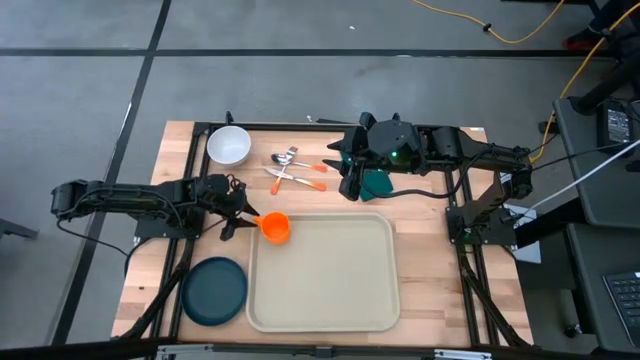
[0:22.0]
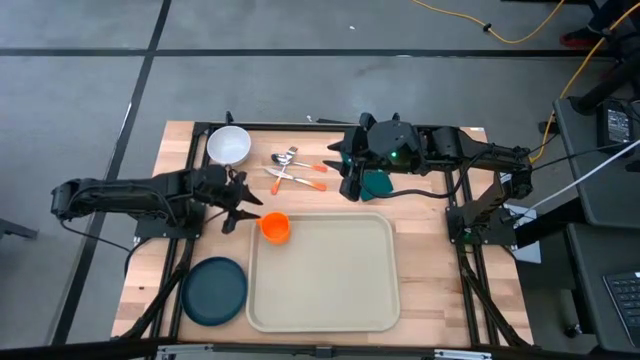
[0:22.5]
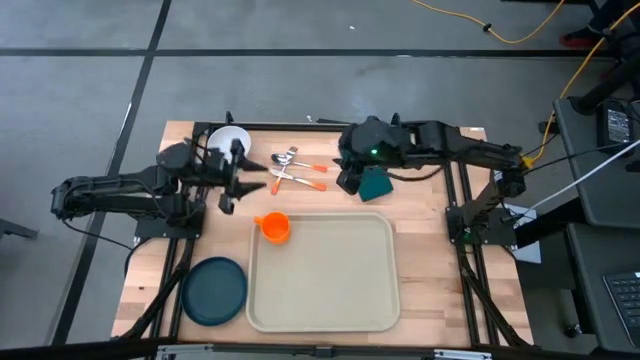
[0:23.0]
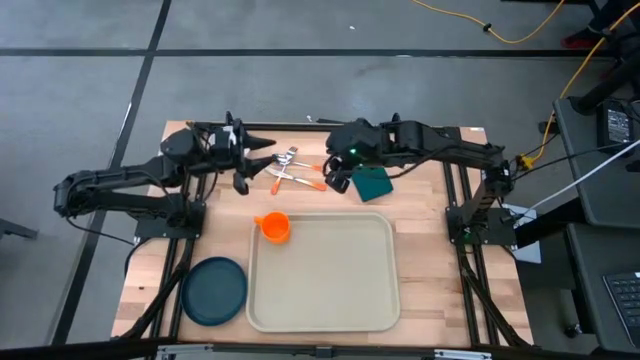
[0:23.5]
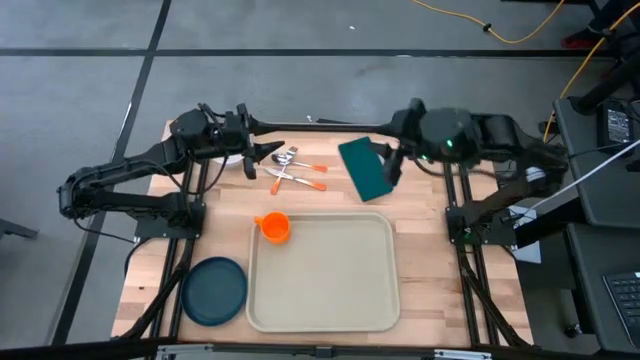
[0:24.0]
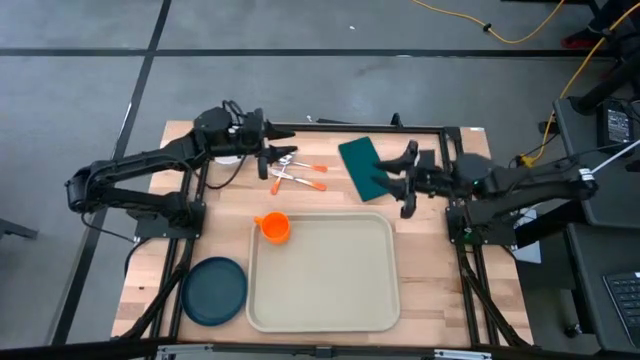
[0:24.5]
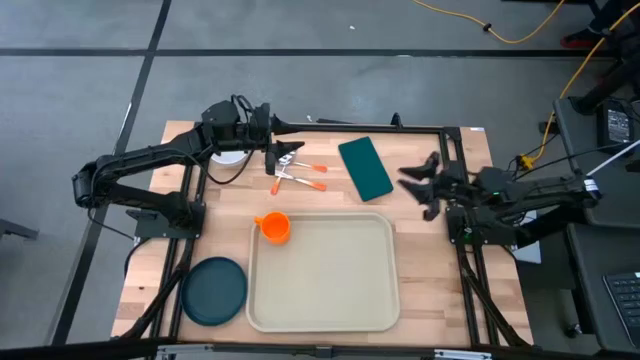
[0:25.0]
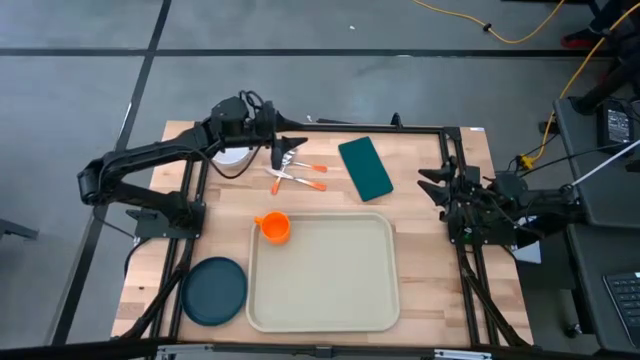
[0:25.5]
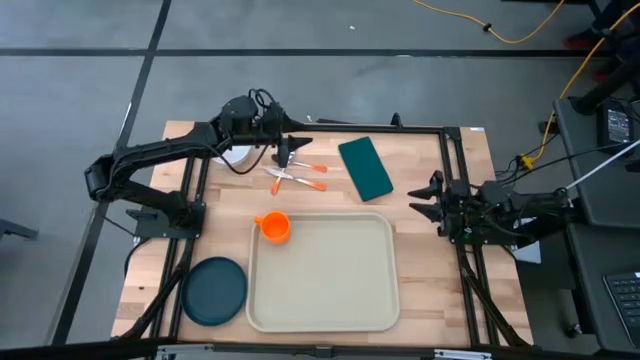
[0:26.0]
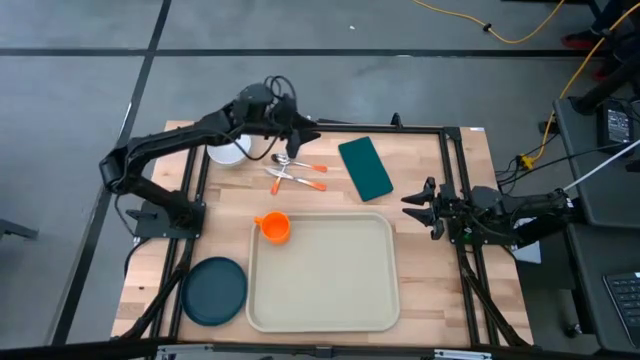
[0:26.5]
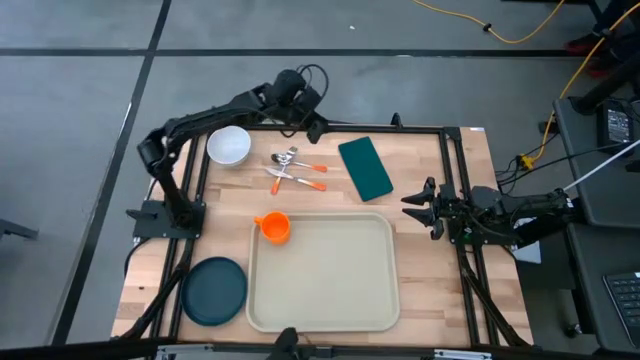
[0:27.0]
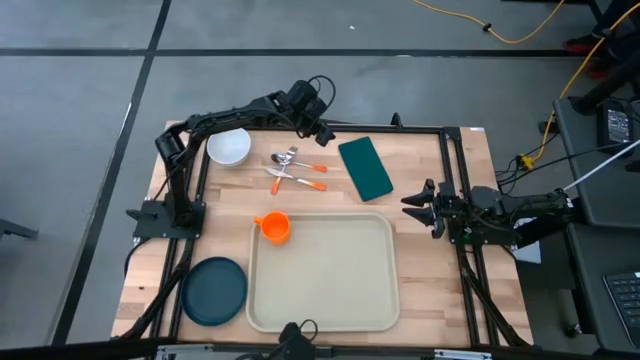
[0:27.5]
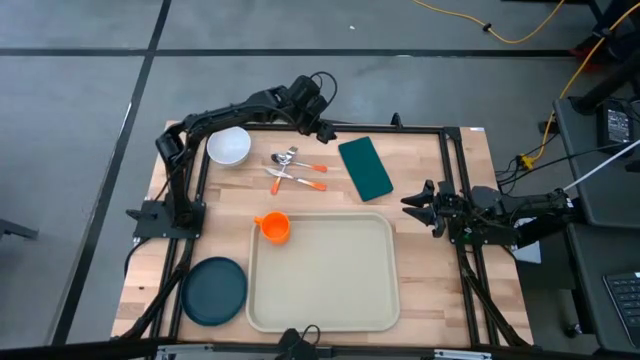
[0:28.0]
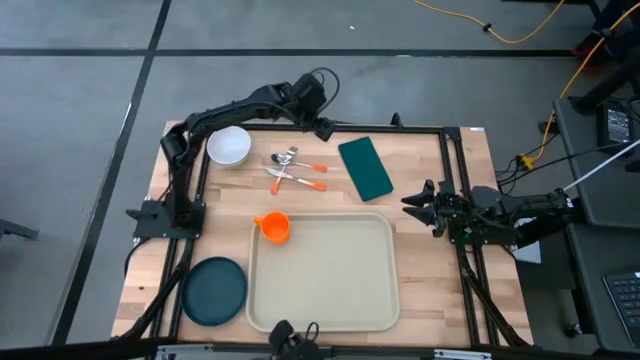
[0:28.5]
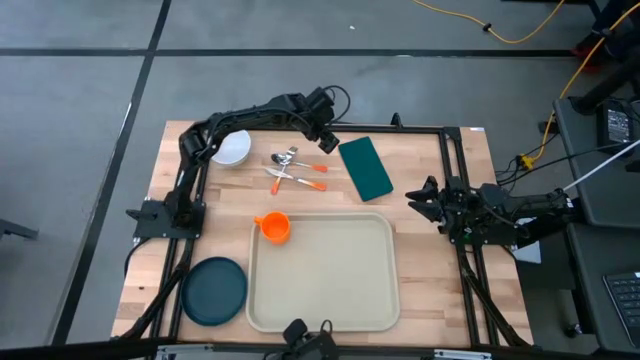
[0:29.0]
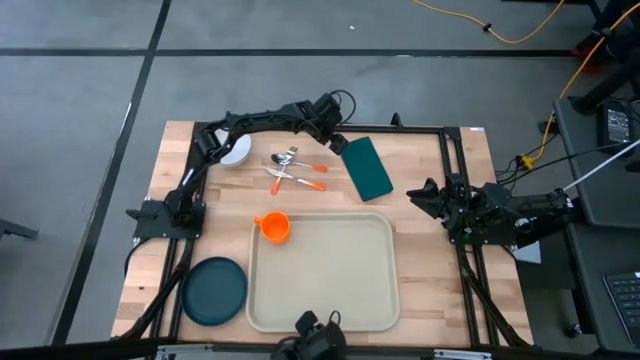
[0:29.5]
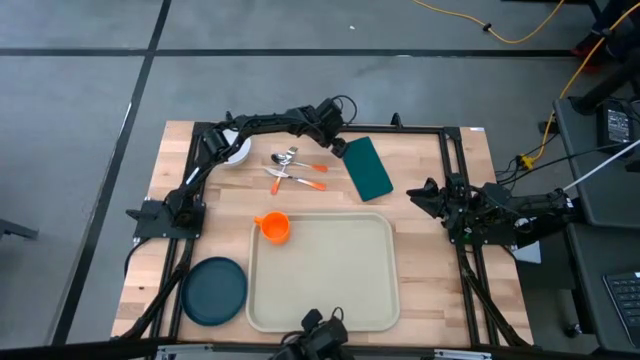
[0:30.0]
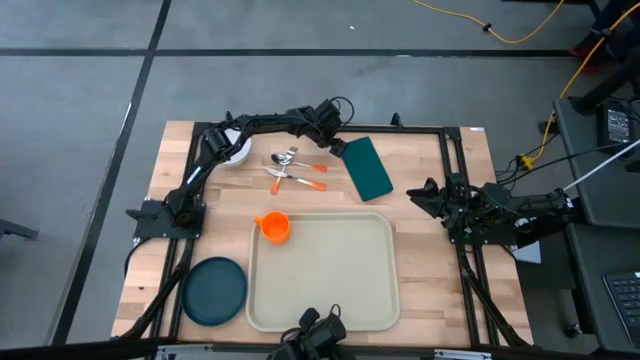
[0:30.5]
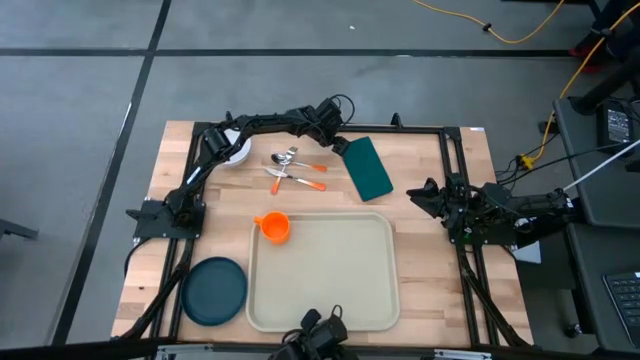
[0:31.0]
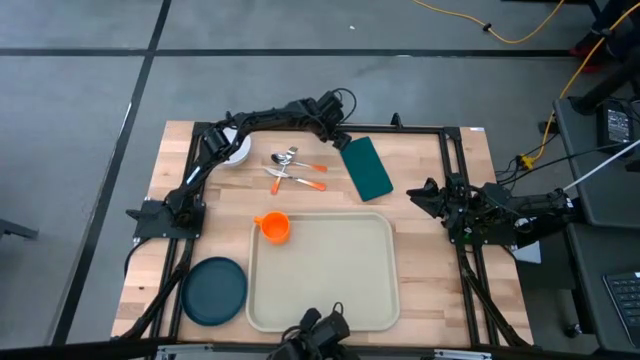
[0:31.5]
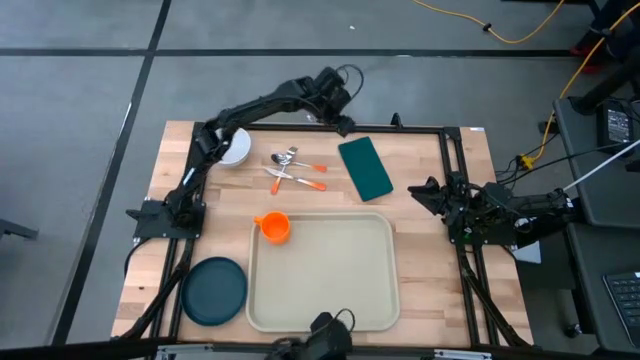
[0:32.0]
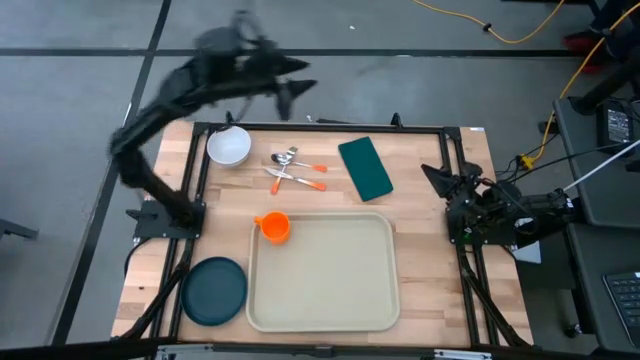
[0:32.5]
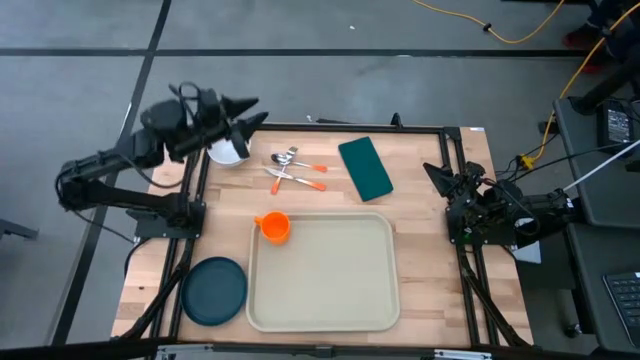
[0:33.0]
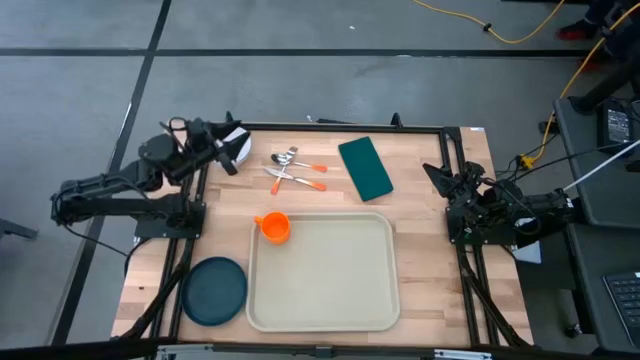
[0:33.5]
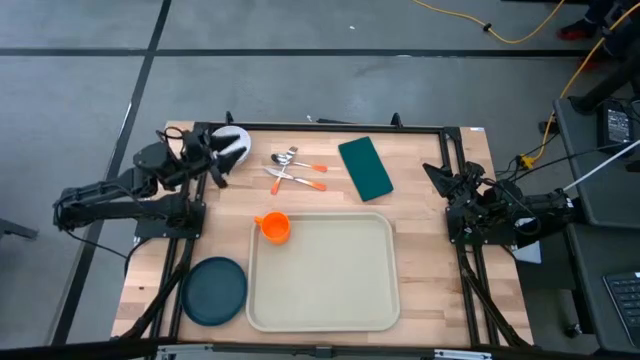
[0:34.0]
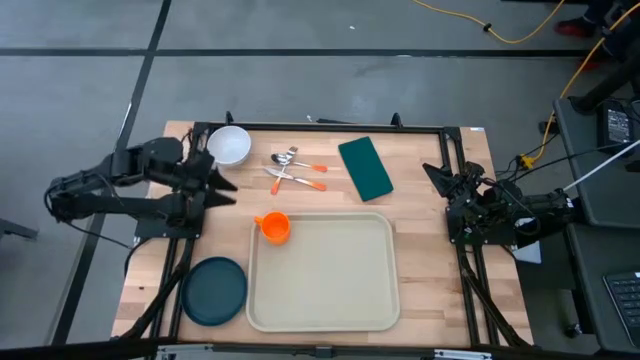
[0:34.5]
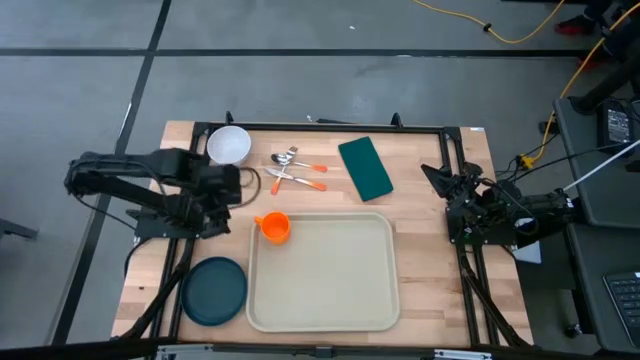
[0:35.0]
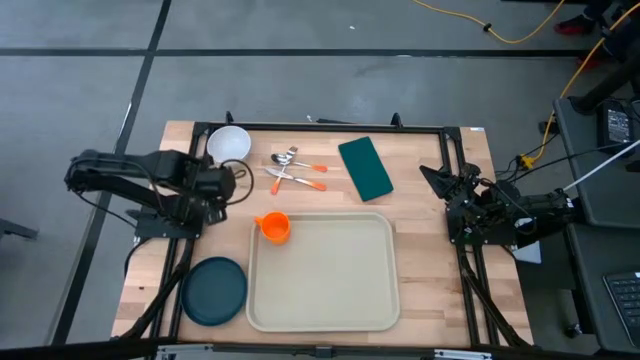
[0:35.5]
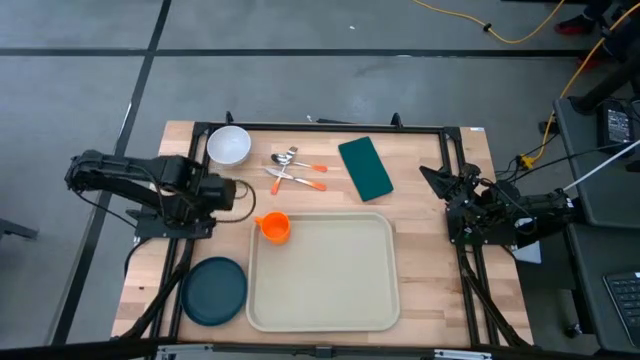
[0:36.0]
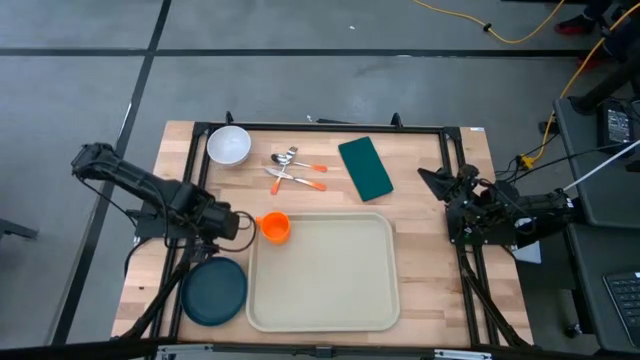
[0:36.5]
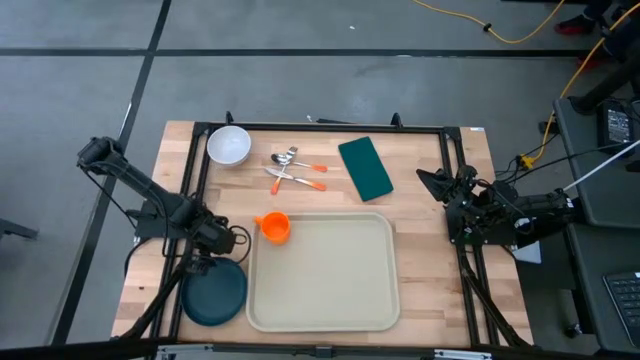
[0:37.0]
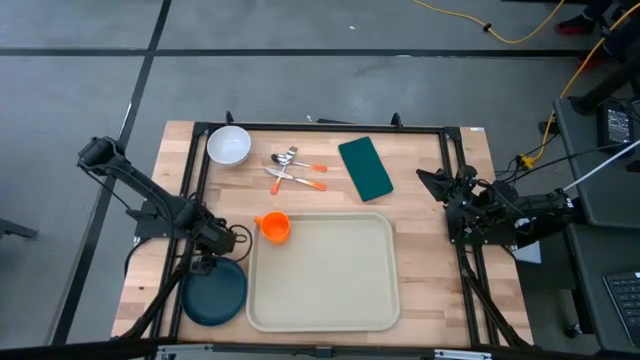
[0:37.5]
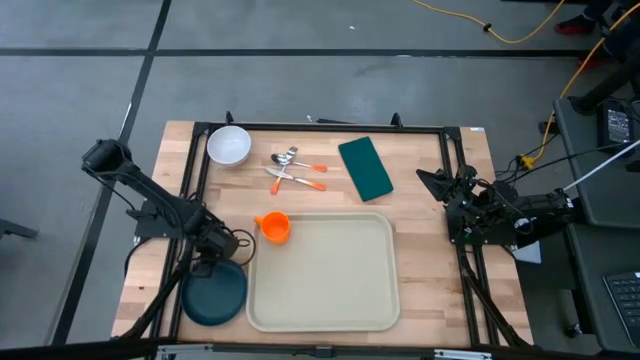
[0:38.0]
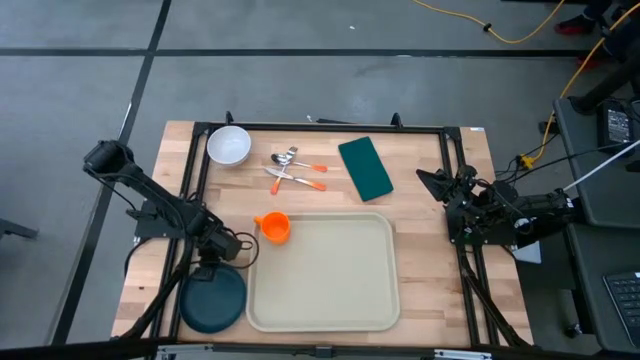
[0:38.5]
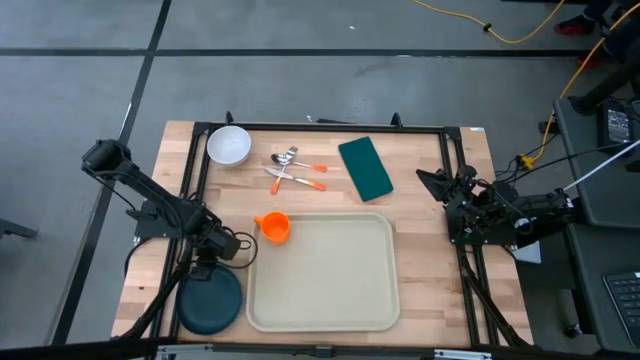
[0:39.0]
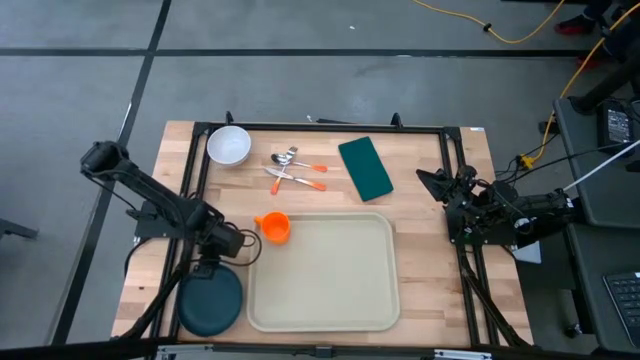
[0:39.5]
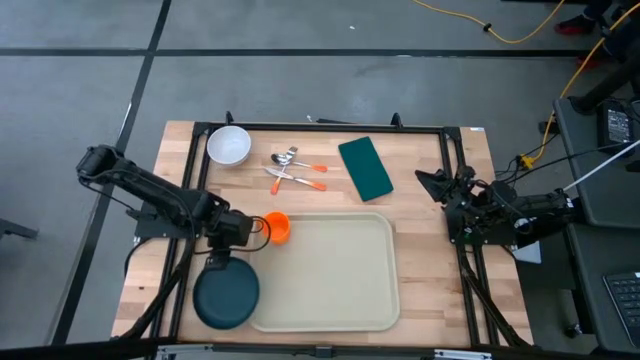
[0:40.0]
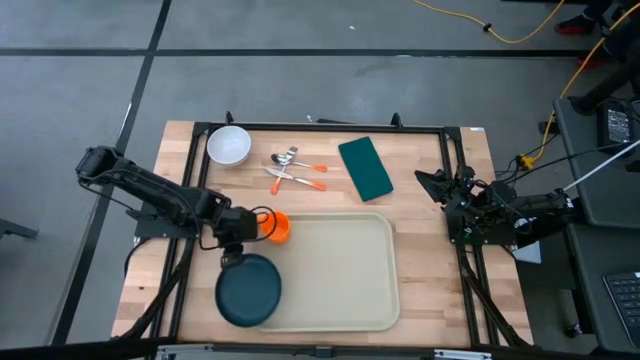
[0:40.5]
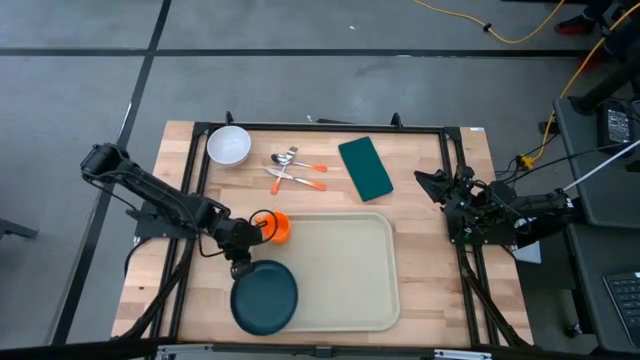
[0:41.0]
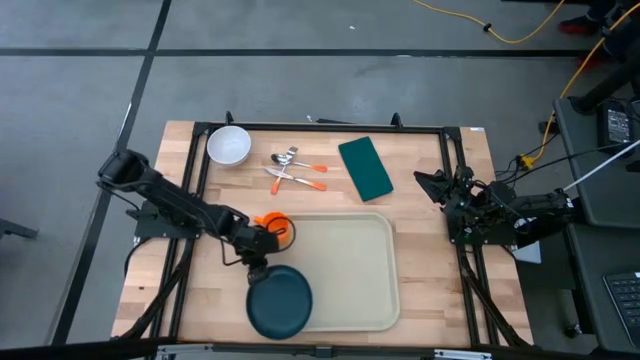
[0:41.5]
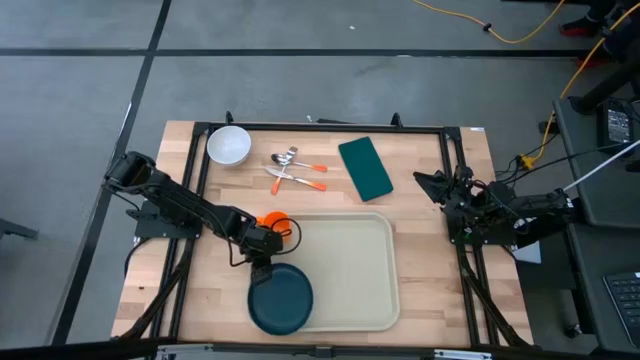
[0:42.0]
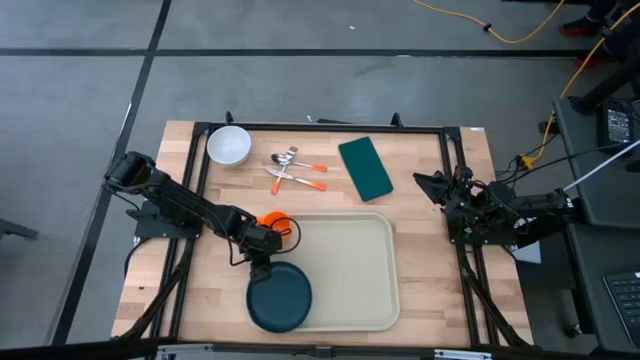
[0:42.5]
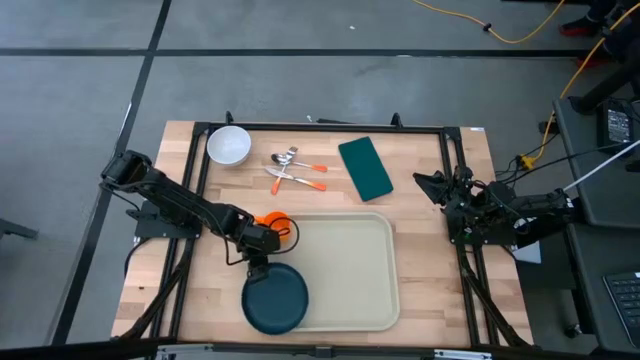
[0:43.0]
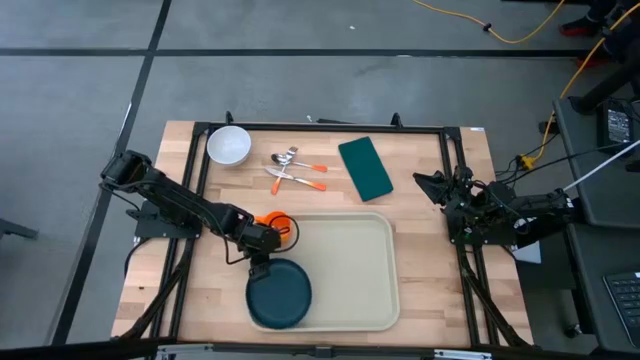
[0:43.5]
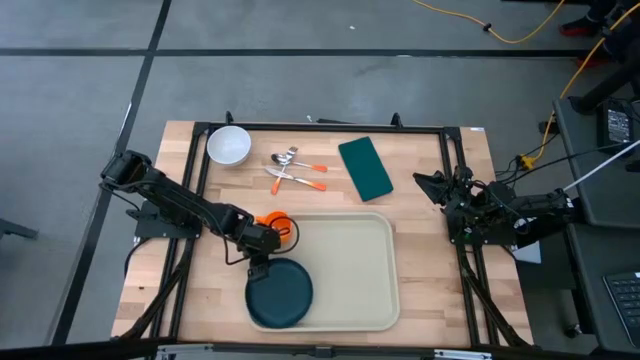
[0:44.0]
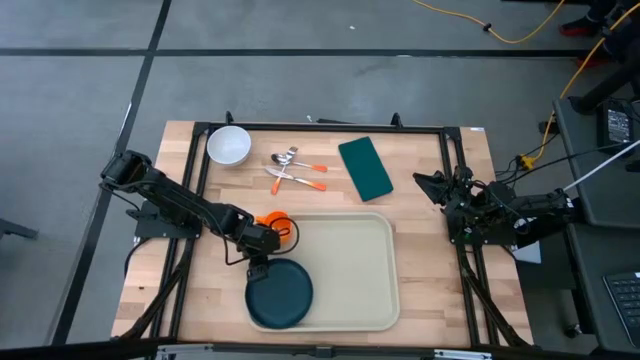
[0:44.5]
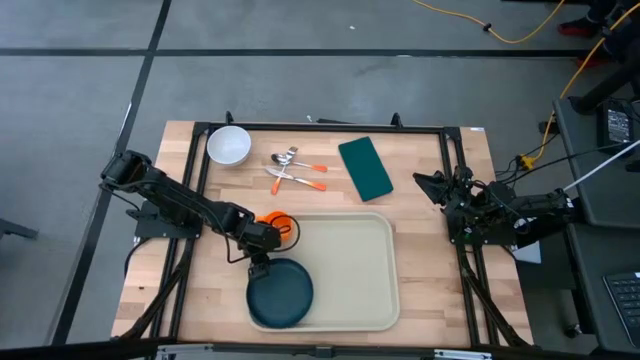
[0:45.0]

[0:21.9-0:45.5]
Task: Set up tray
Put the black plate under the orange mug on the gray serving tray
